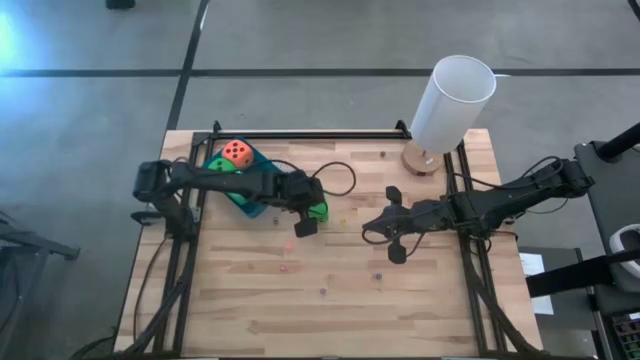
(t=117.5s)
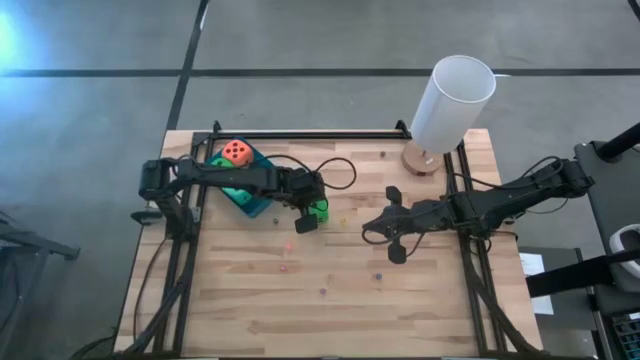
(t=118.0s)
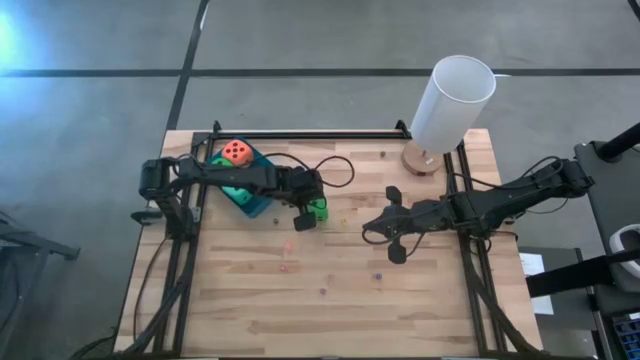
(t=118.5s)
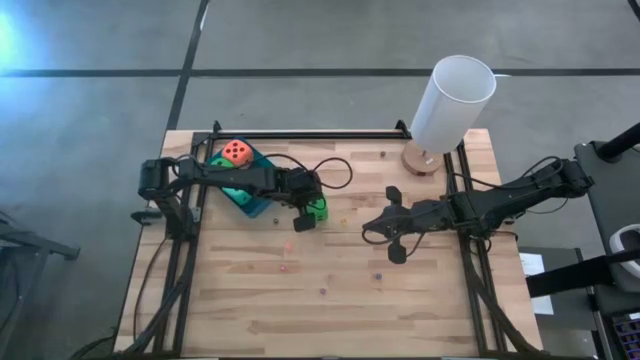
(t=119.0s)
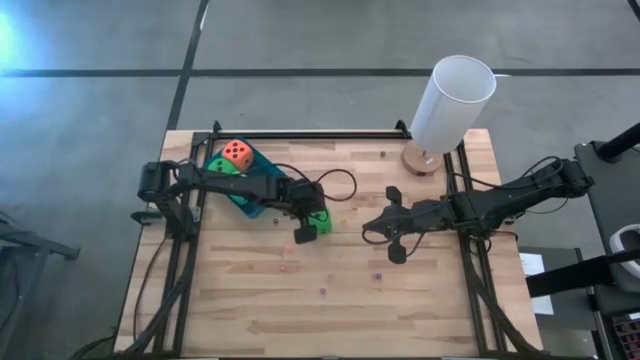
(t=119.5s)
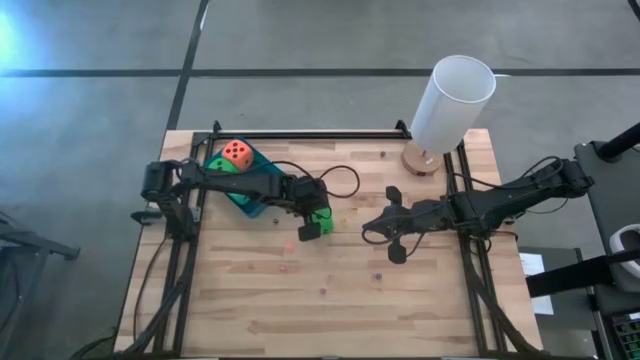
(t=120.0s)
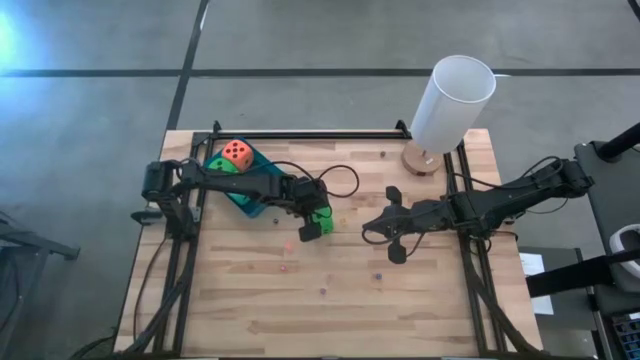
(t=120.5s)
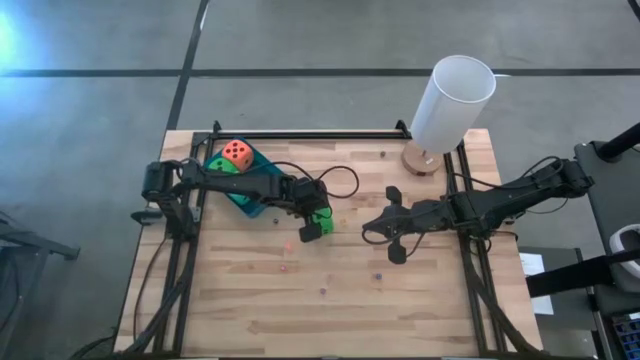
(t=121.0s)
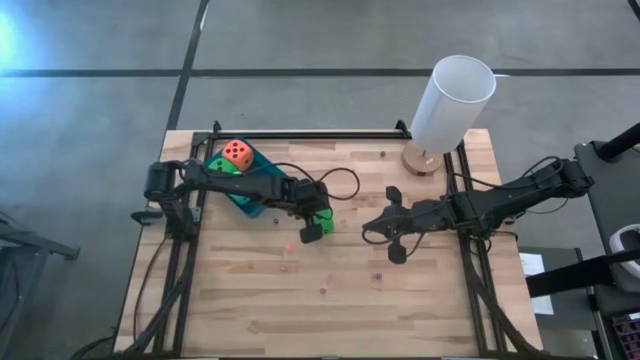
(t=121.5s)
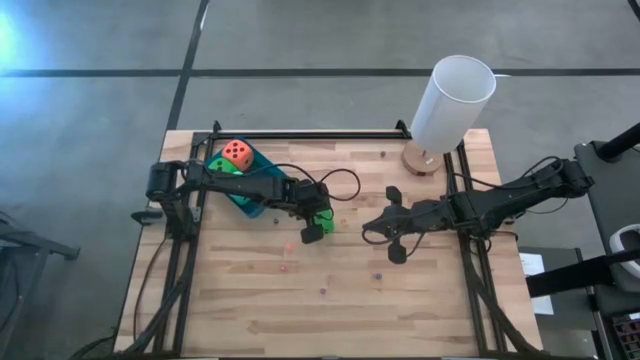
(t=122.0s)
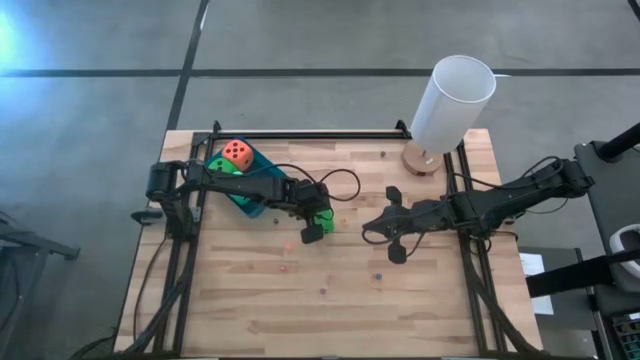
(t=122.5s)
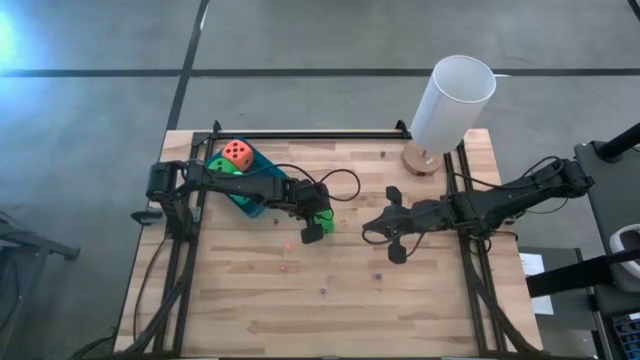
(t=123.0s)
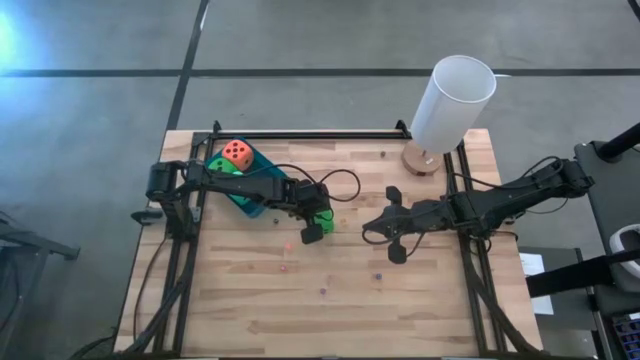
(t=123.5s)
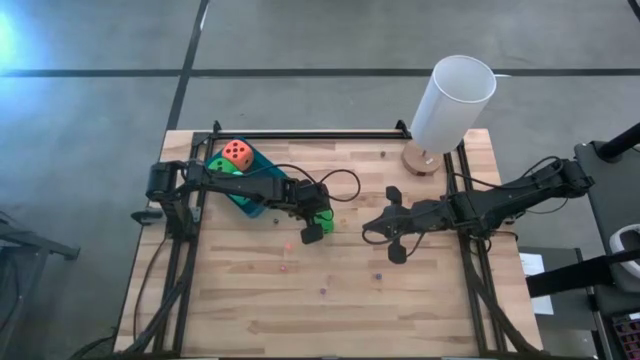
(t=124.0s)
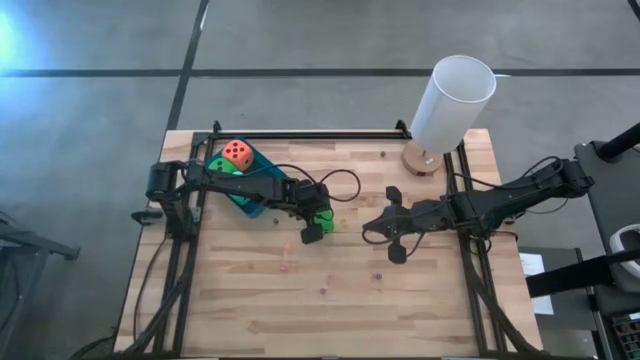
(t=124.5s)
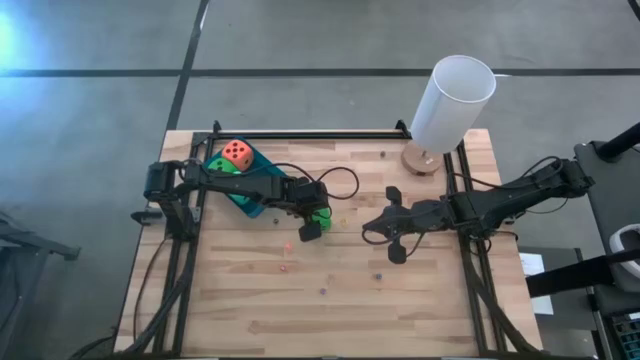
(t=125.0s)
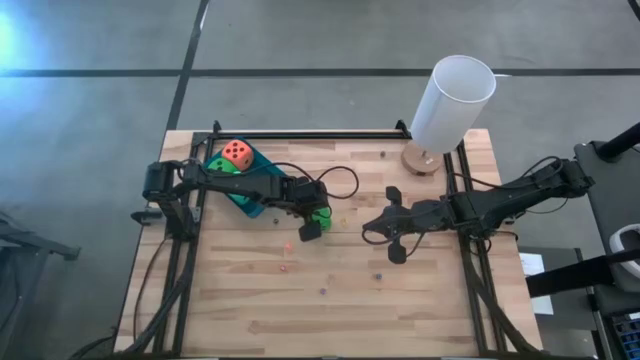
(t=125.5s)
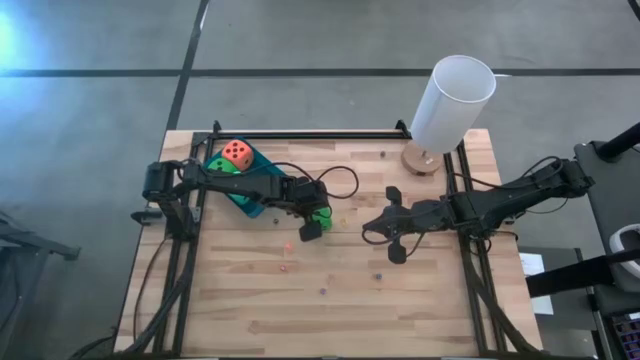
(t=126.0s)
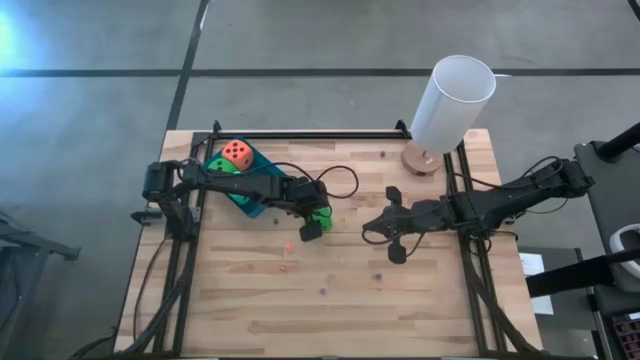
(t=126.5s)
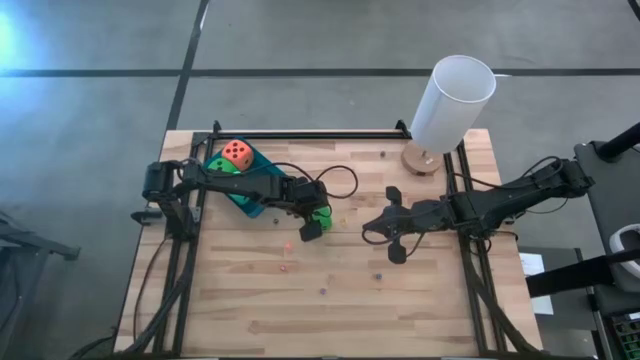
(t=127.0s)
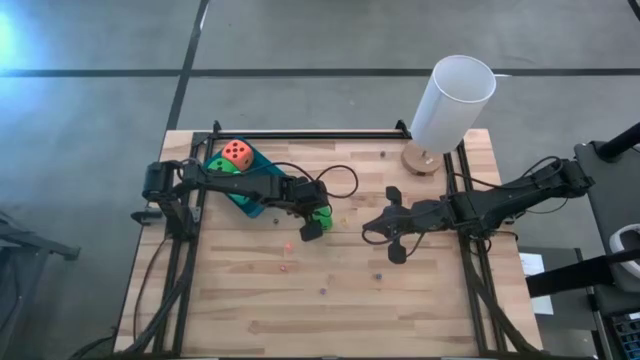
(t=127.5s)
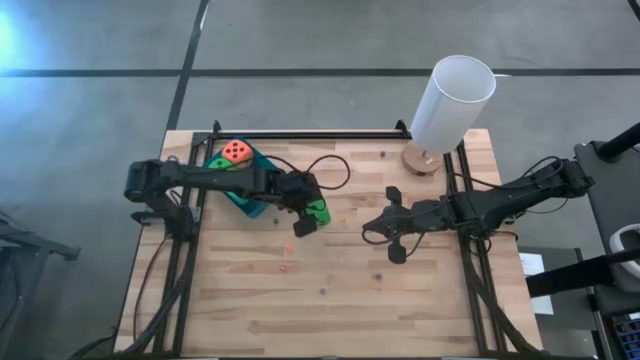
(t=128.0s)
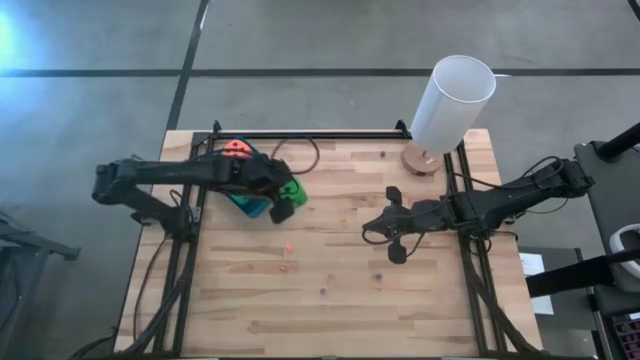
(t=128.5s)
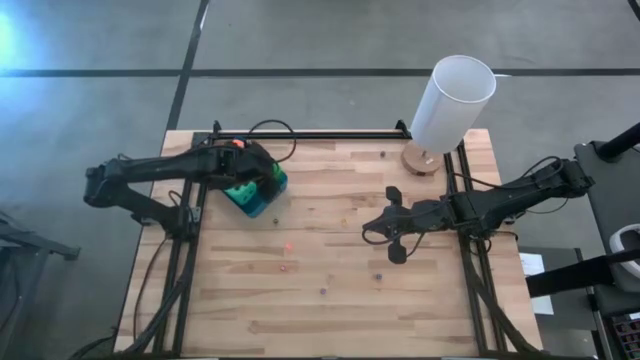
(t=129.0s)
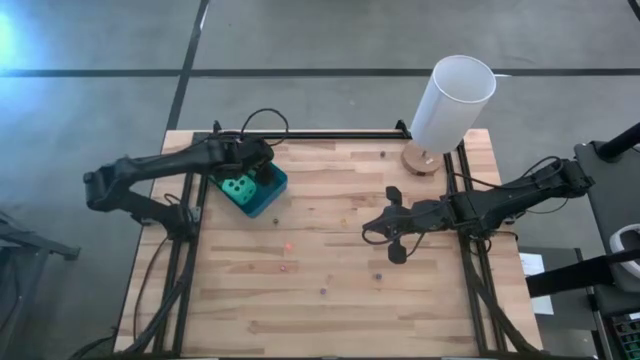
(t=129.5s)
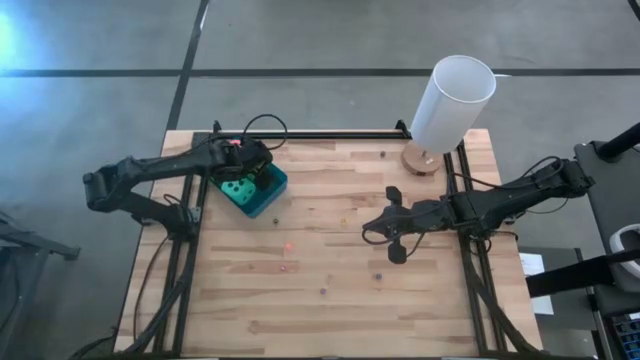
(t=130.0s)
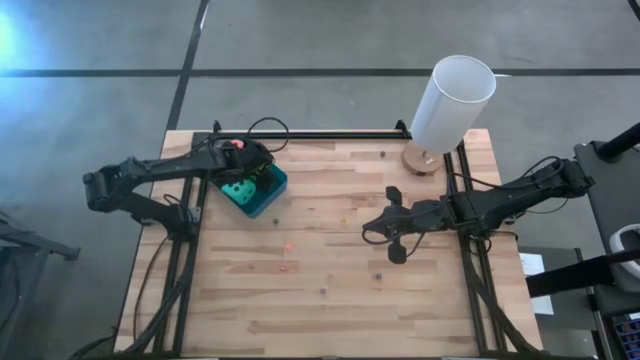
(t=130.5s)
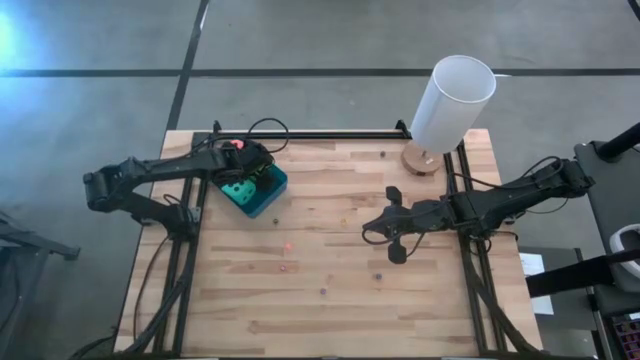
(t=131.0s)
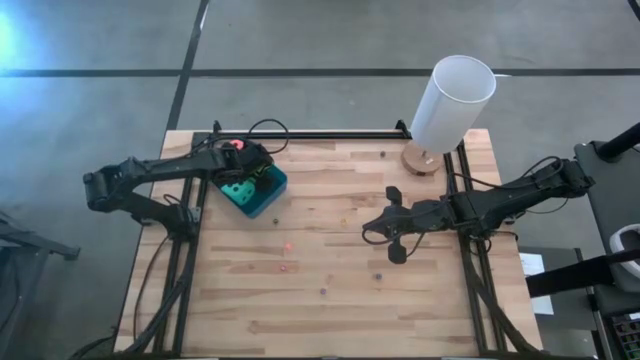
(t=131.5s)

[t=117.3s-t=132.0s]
Task: Pick & Place Dice
Put the big green dice into the blue bin

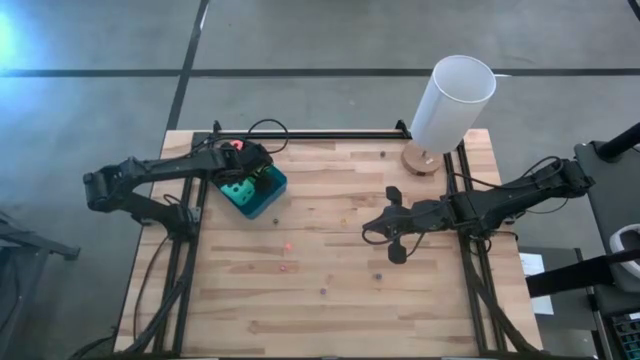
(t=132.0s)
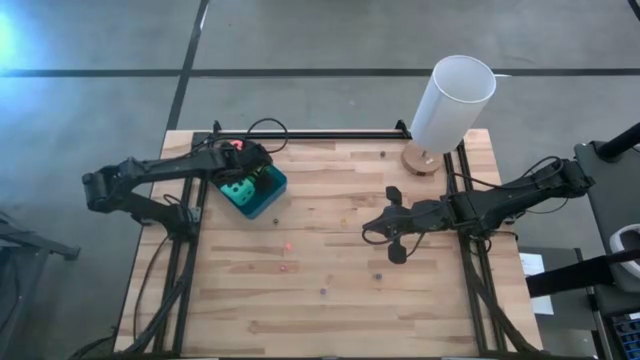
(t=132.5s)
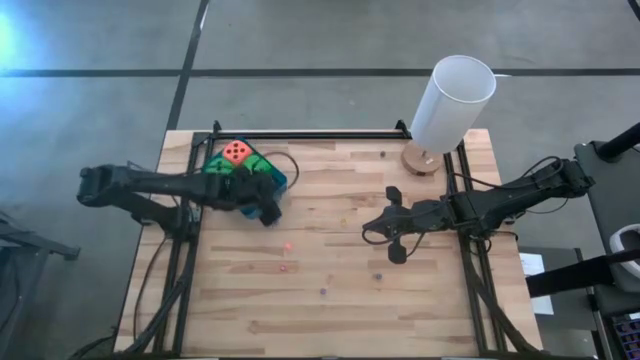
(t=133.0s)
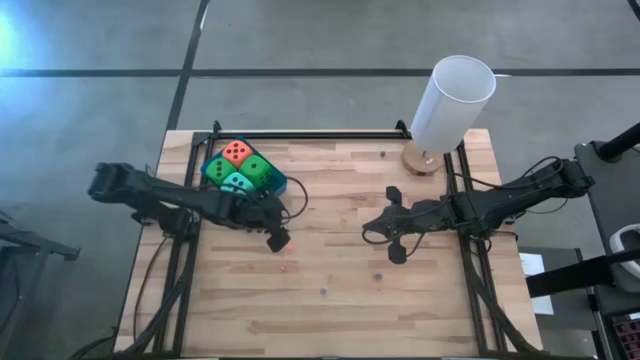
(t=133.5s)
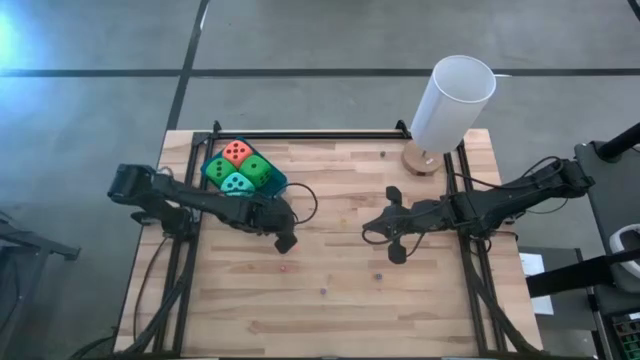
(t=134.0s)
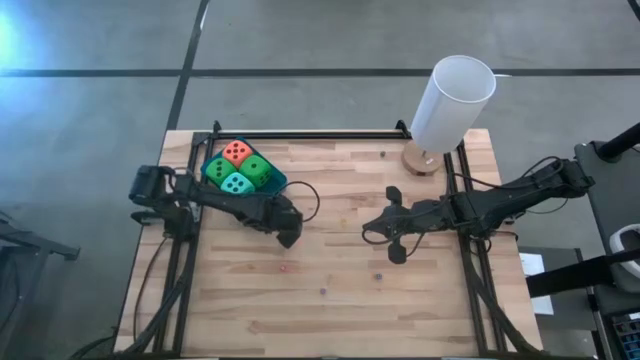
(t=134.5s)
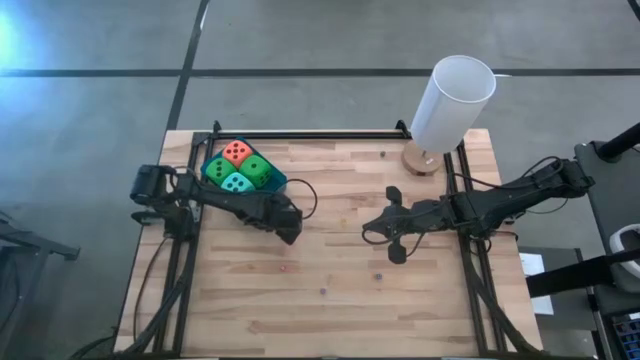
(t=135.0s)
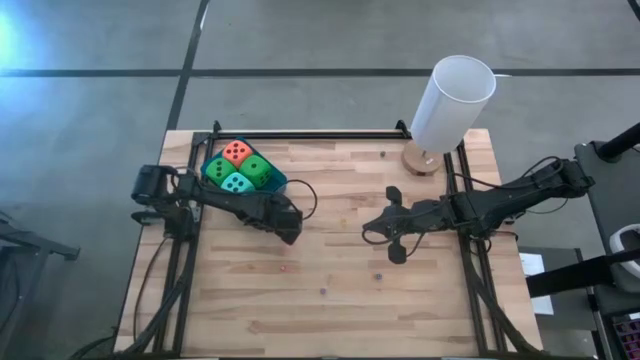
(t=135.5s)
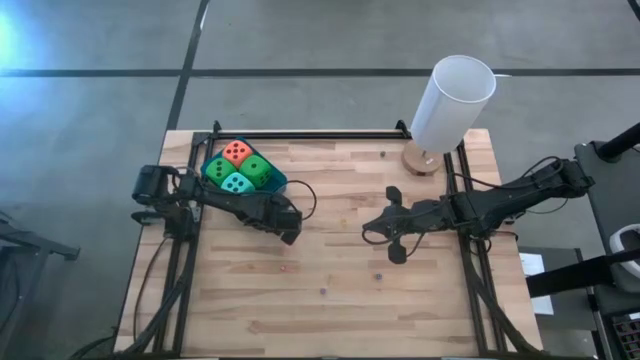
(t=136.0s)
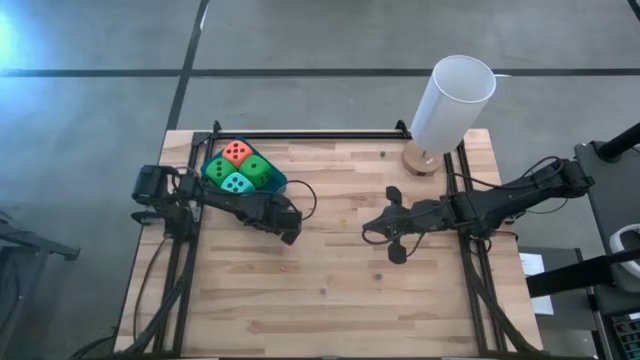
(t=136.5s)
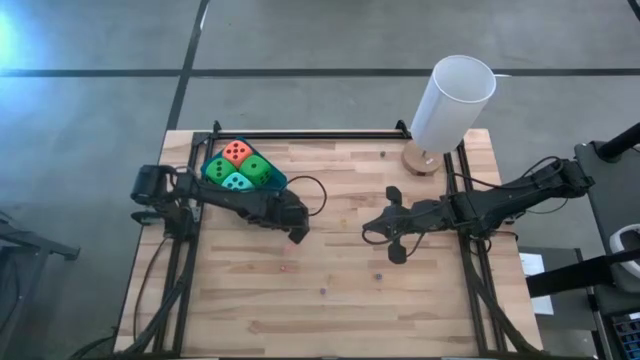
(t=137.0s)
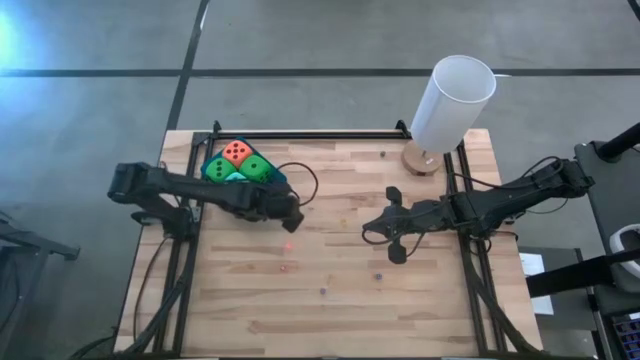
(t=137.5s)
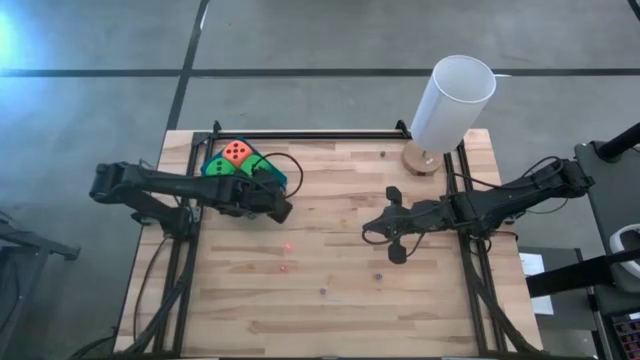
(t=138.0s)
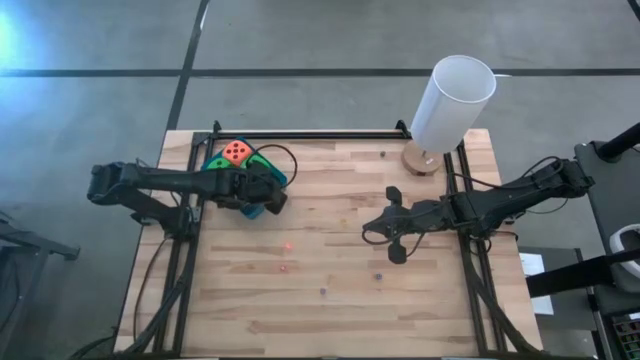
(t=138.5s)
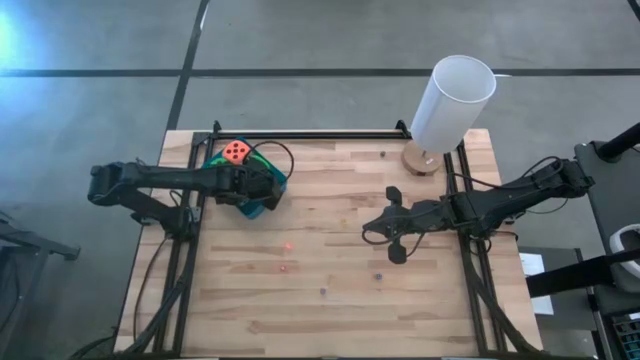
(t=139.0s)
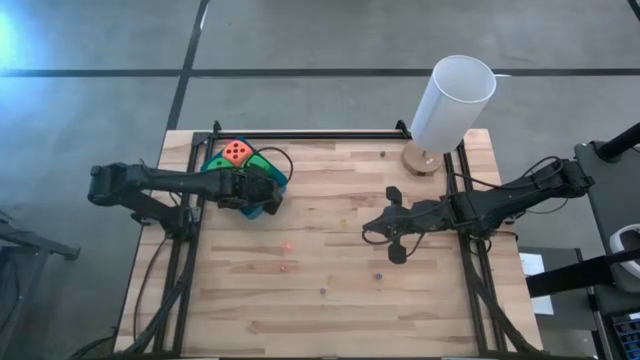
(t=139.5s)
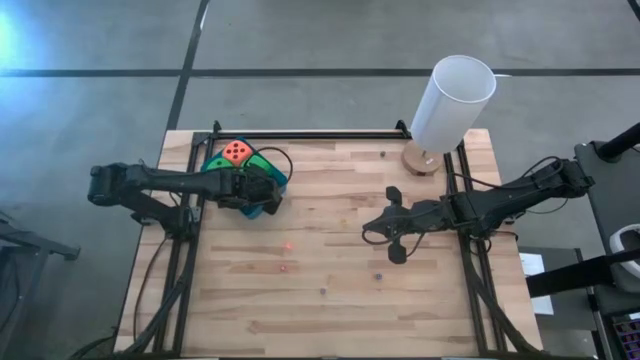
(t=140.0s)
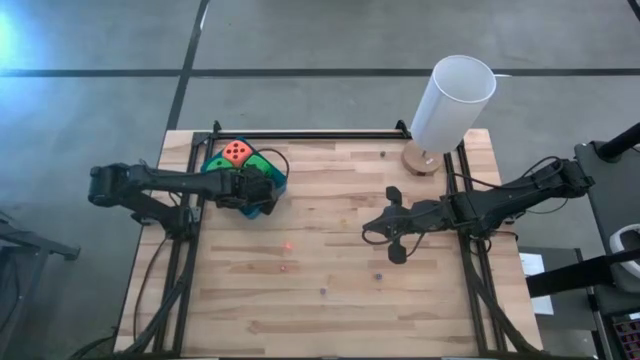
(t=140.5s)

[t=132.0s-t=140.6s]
Put the small black dice on the left into the blue bin
